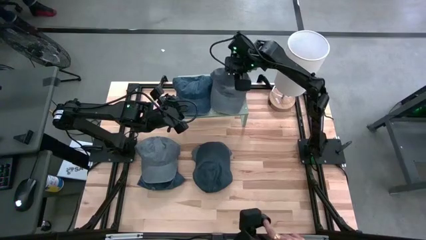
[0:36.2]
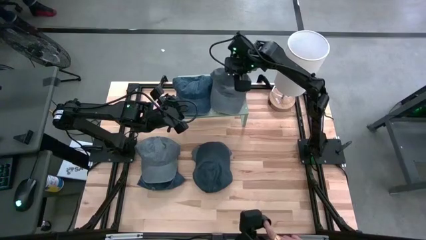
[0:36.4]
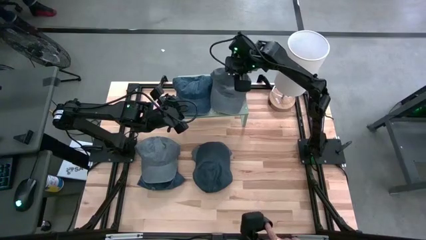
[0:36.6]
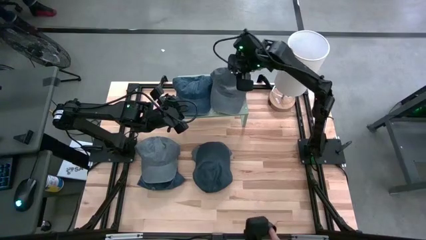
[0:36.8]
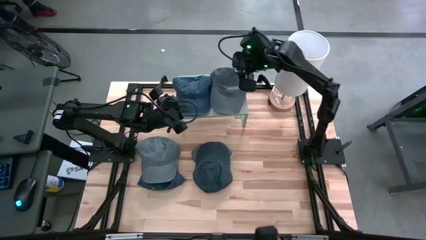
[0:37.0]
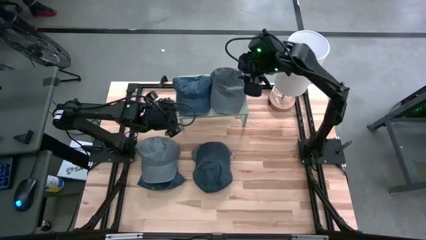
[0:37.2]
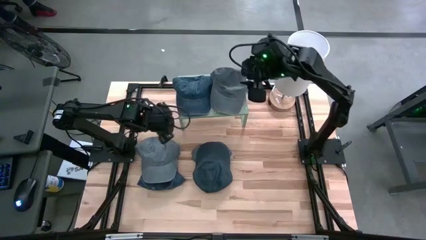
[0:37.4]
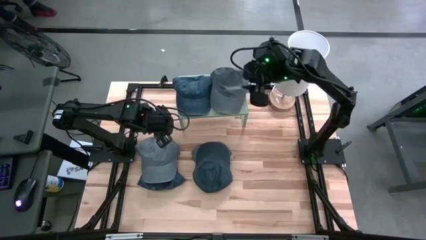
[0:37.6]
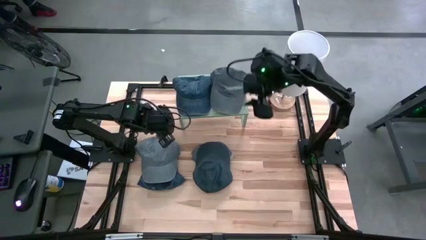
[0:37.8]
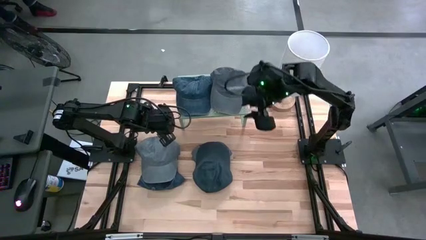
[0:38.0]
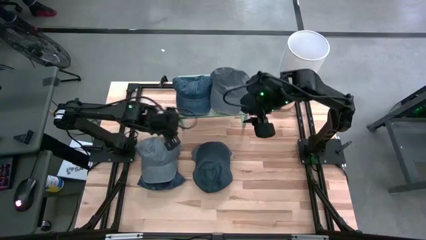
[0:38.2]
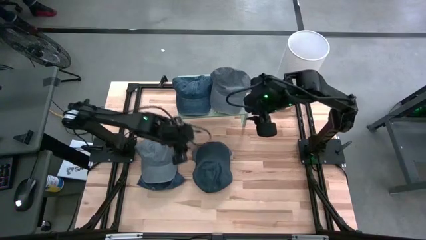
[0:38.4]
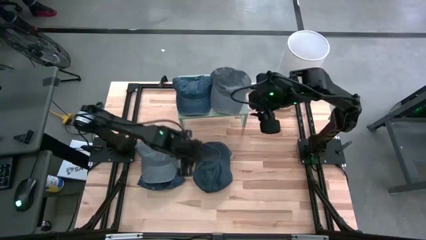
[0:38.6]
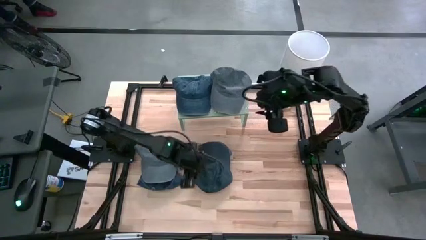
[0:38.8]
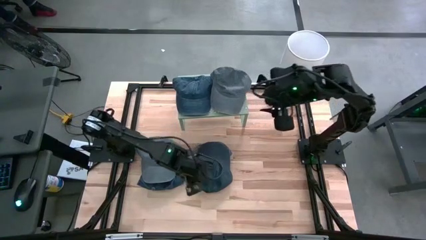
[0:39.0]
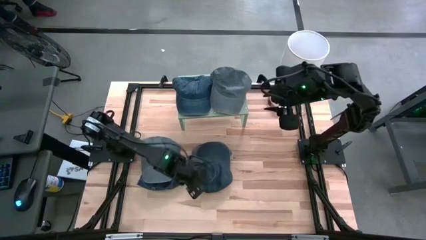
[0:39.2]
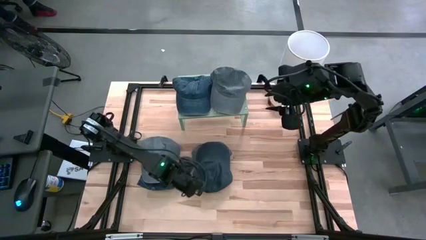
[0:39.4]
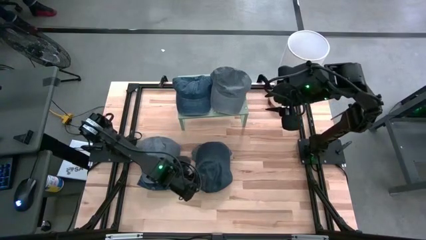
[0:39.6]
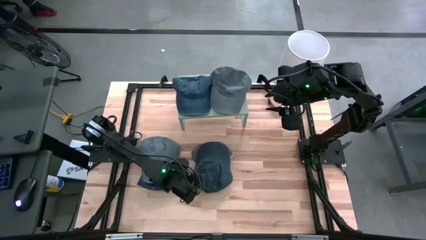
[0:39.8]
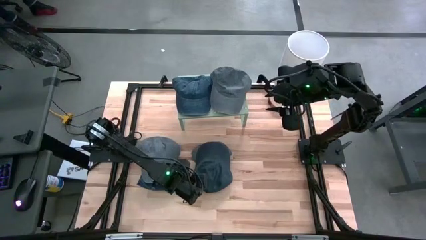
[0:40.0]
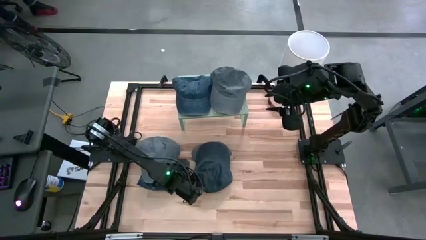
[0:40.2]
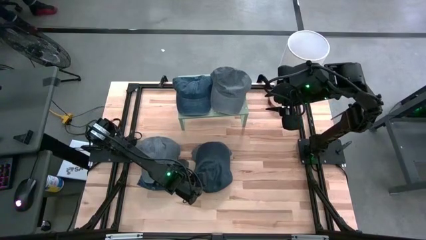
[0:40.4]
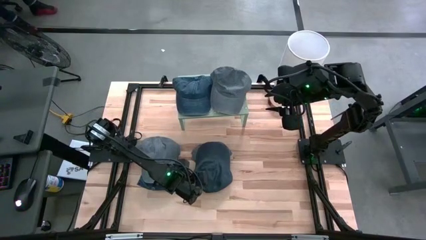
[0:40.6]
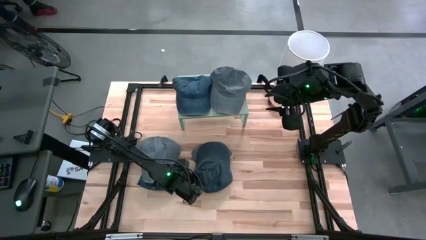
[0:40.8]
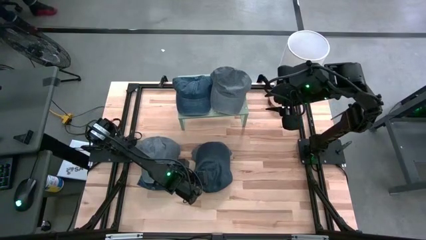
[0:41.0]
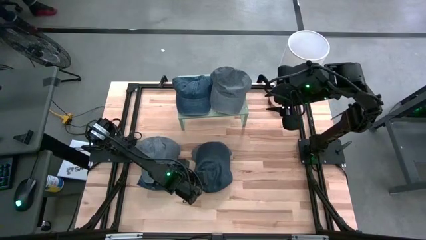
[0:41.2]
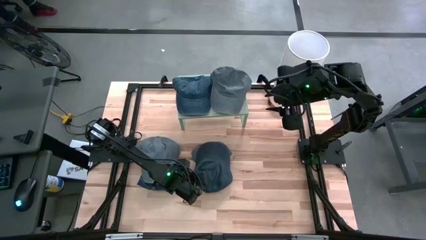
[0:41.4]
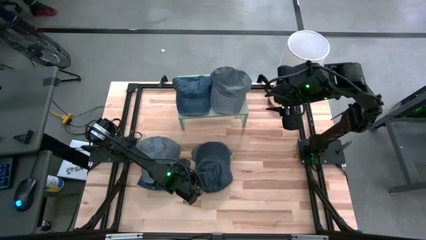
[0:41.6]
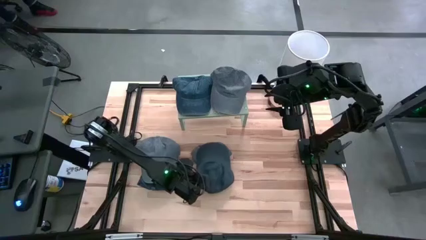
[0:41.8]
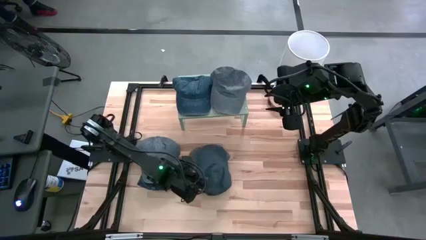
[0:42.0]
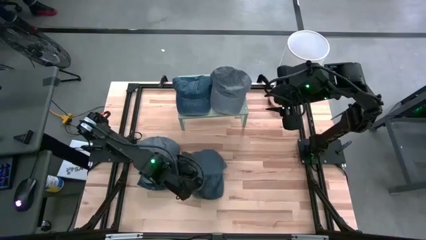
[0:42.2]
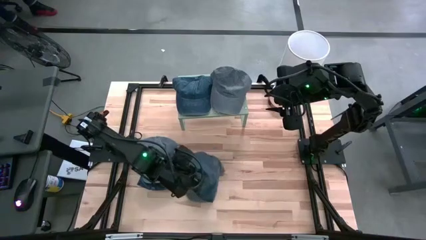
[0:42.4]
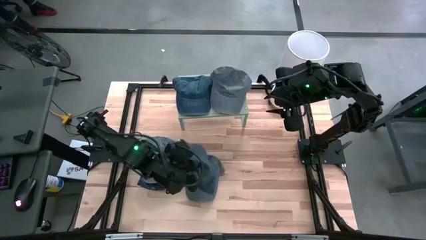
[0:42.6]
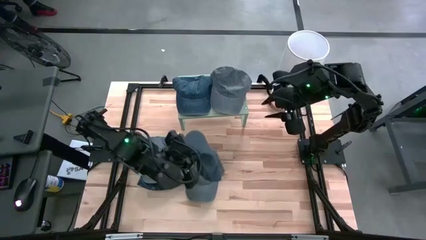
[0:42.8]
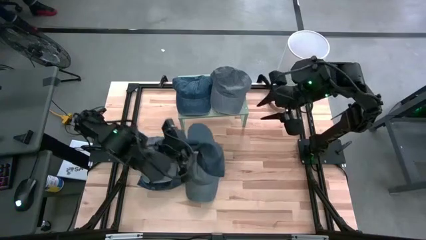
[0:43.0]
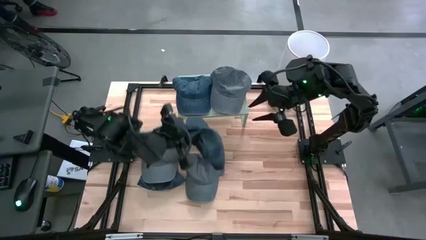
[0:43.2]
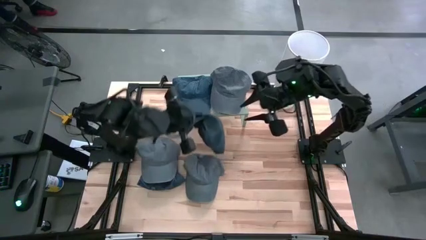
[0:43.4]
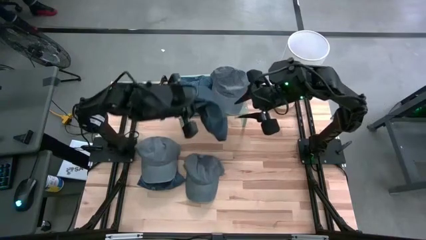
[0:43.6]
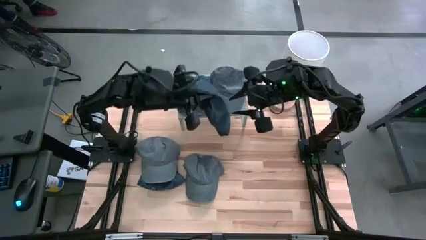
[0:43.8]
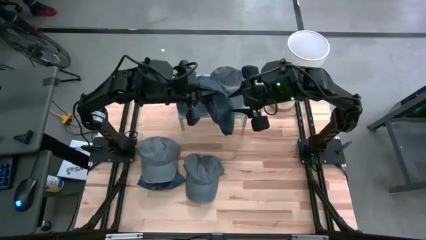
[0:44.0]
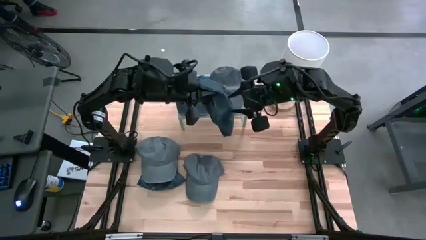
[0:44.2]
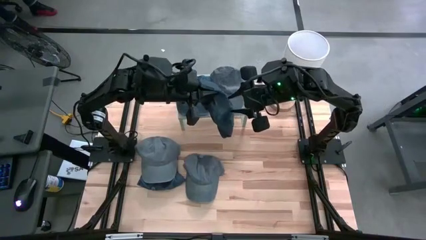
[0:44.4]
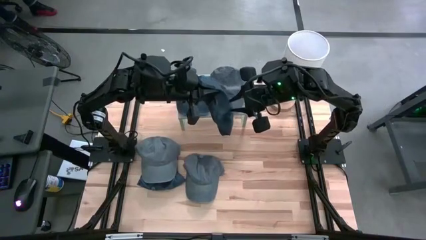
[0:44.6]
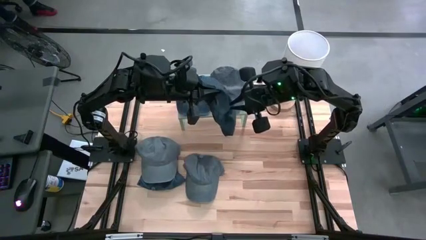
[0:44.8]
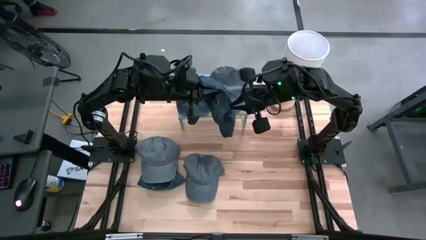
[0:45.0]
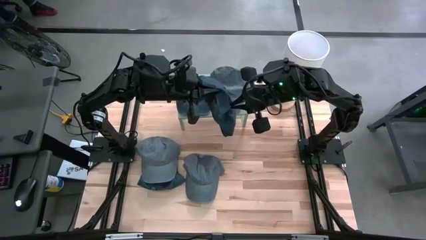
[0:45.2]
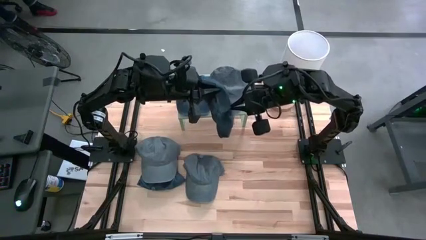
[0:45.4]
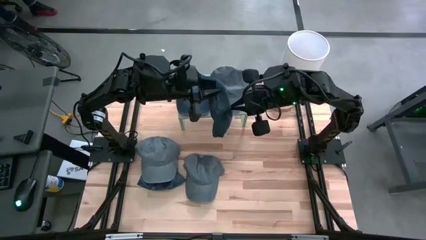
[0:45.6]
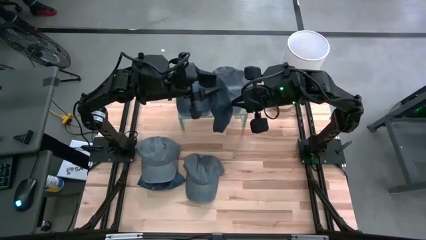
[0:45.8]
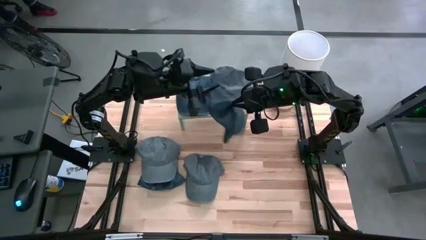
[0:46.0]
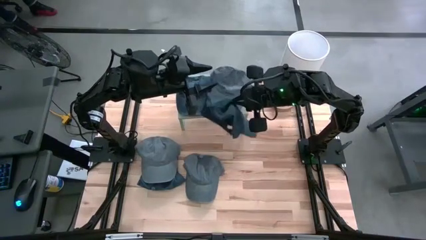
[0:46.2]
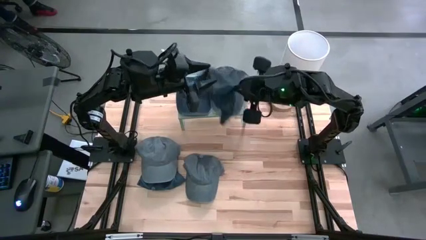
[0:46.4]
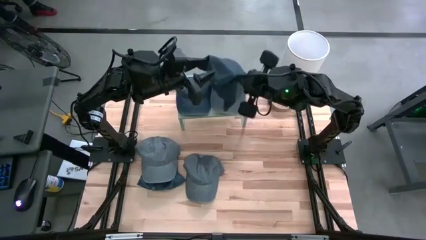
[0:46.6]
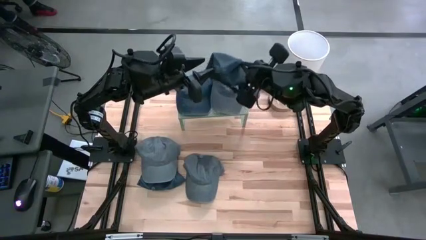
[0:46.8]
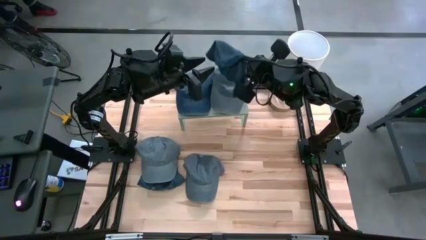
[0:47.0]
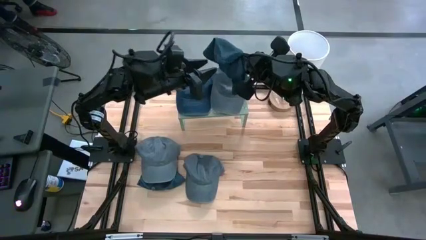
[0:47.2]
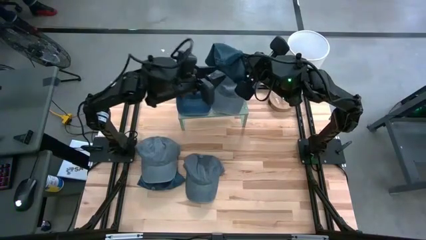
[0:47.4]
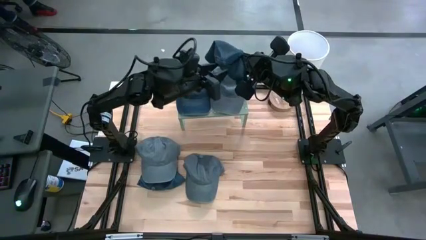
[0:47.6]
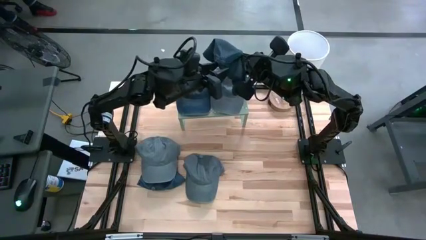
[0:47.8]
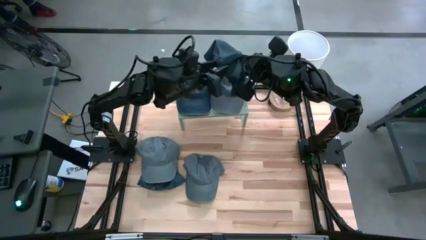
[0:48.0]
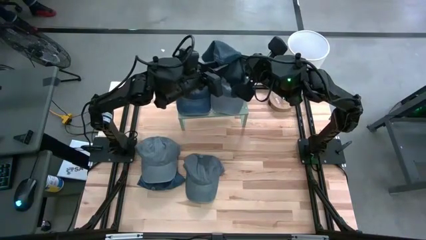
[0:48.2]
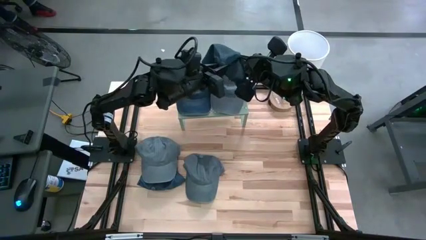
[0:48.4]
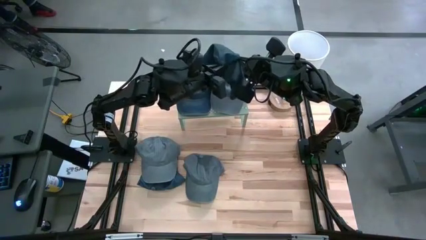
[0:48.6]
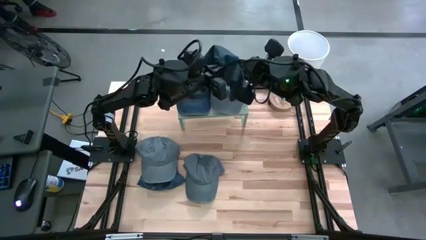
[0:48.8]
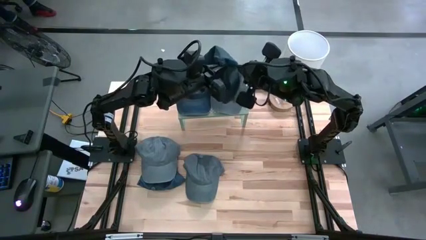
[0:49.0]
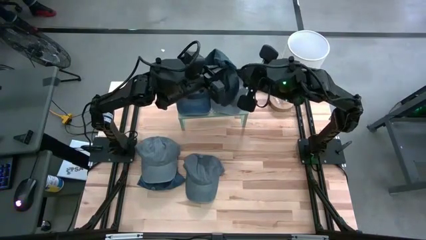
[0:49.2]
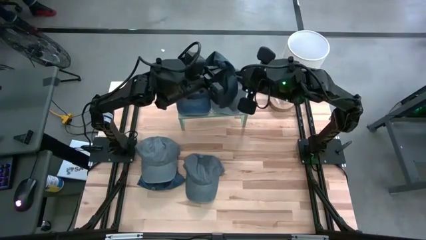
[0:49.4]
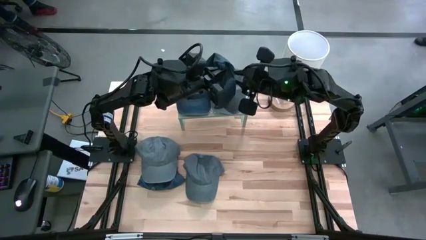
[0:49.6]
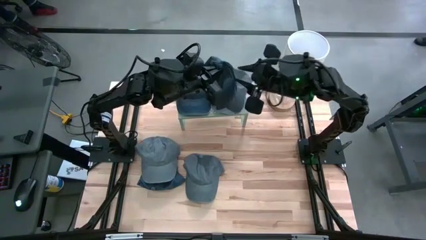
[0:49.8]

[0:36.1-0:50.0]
Task: Pick & Place hat
Stack the right blue cap on the blue cap on the shelf

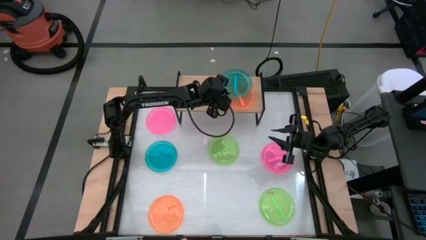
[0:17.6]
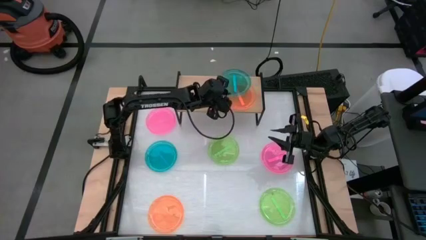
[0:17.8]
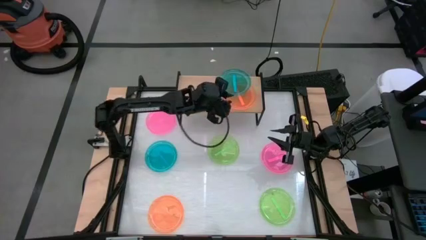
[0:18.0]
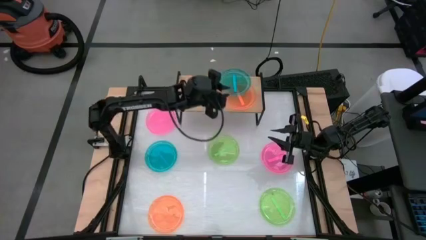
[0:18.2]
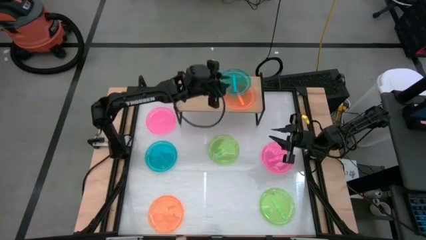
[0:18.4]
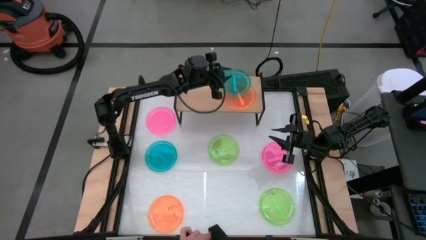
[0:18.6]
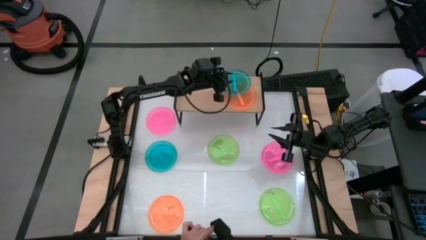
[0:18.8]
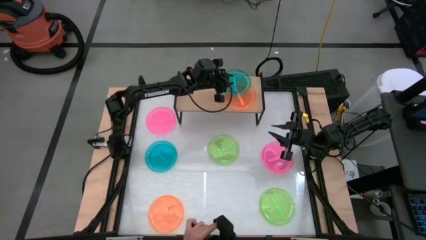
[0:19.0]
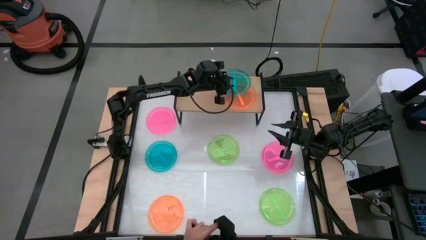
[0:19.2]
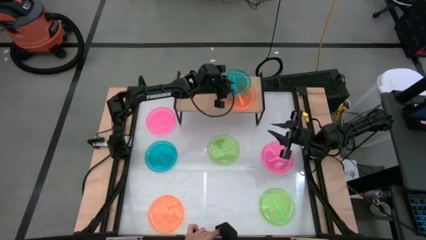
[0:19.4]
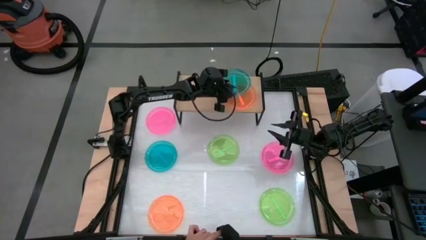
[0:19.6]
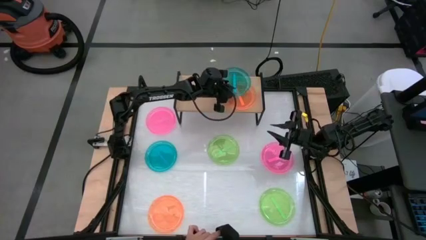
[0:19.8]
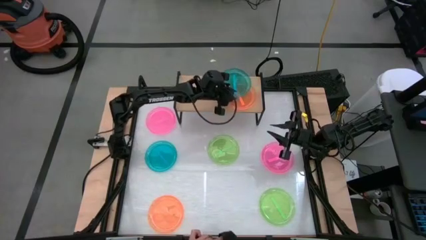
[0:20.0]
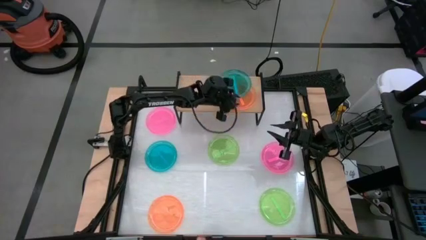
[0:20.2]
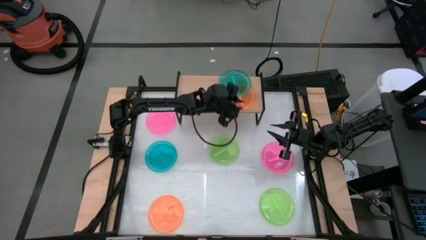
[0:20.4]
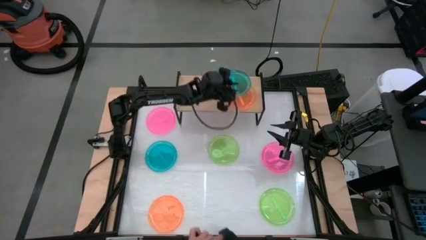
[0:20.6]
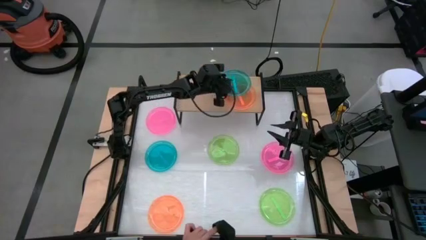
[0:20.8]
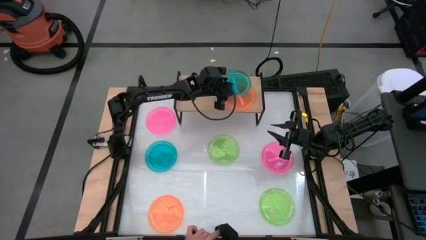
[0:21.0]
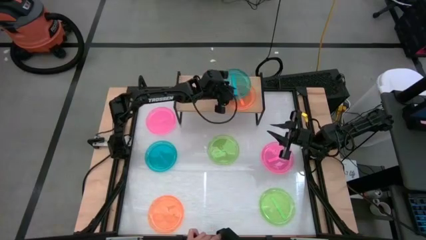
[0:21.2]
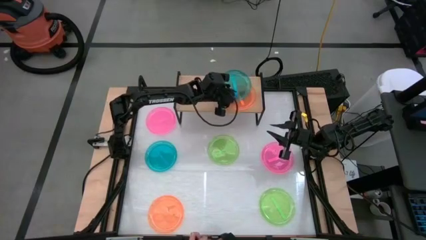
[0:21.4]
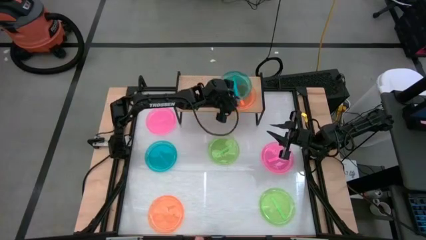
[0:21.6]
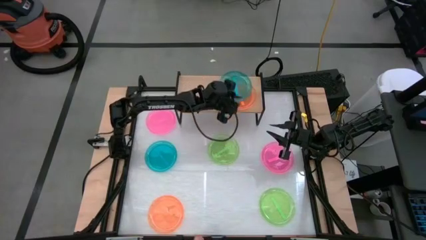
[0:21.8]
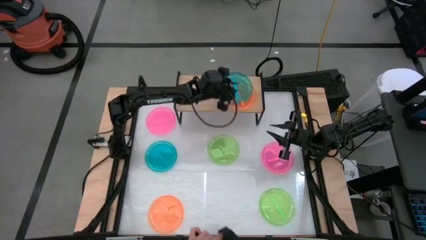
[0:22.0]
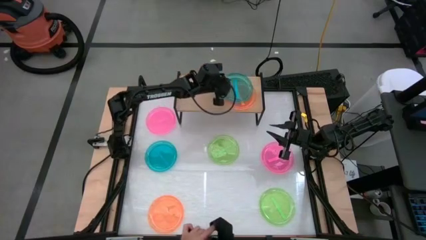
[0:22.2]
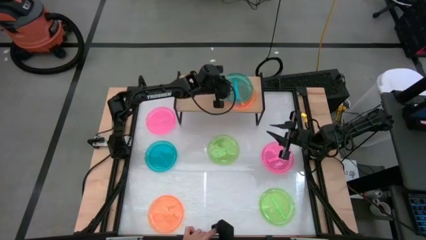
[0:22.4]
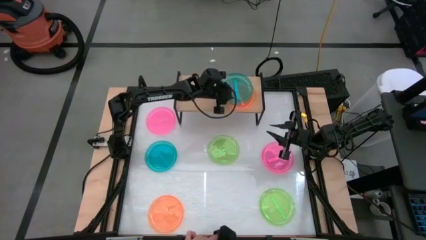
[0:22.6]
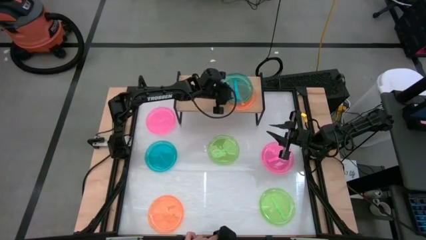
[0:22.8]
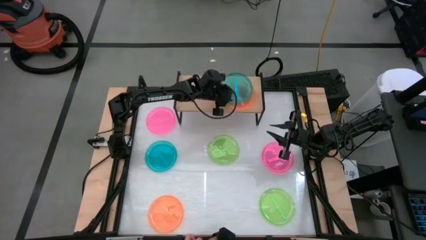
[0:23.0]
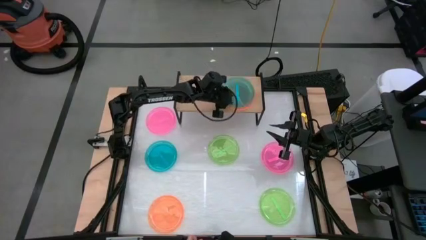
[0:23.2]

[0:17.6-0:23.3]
Task: Place and stack plates onto a shelf
Stack the bottom blue plate on top of the orange plate on the shelf
